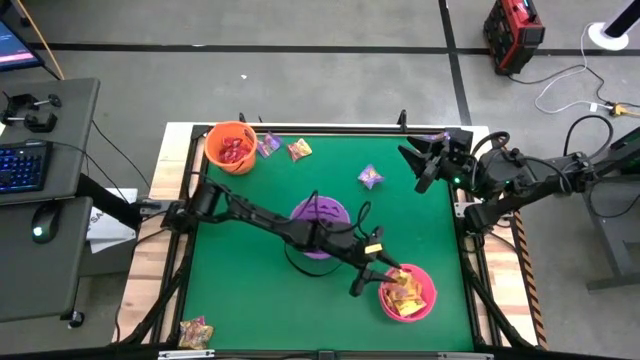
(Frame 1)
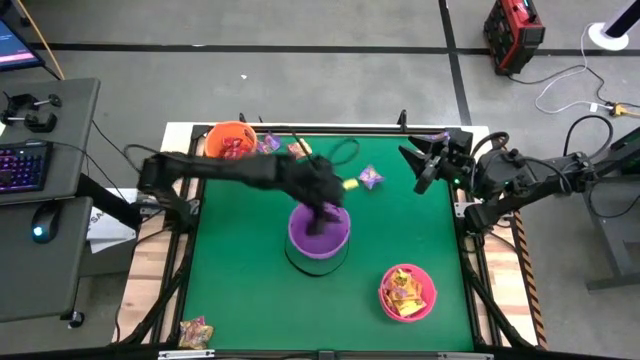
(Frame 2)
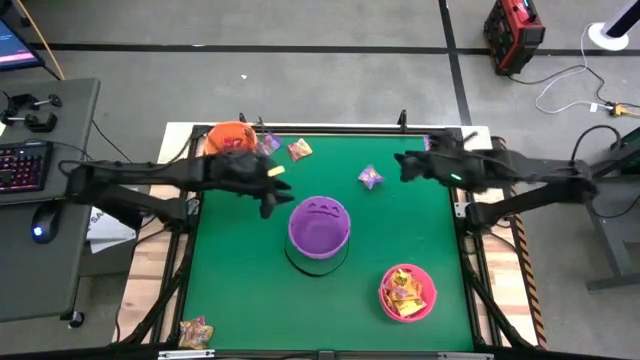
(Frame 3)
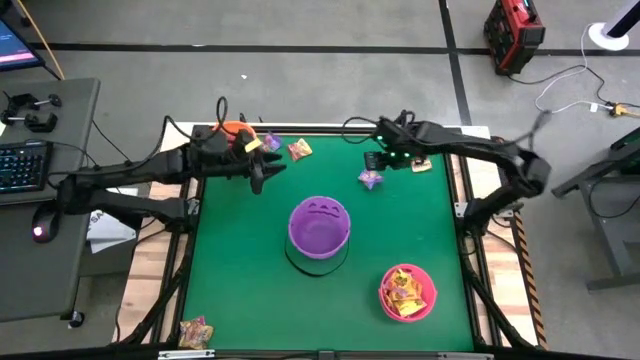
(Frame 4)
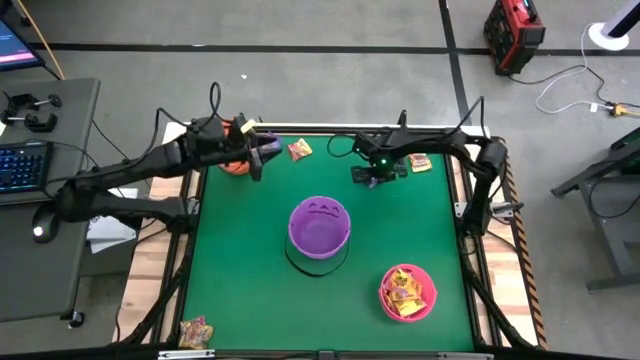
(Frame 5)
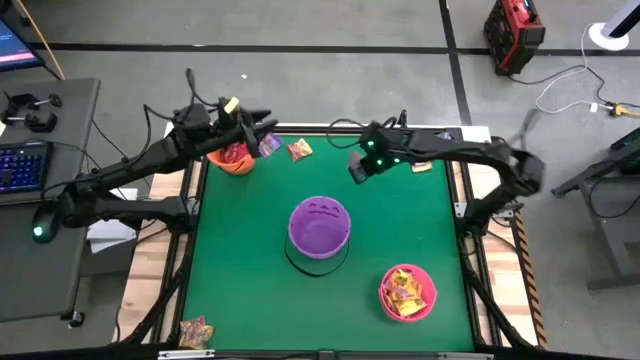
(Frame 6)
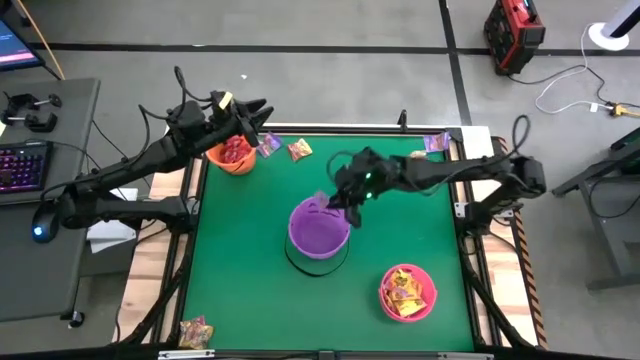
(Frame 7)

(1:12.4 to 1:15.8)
Task: Sort candy by brand, put in halloween buckets
Put the violet candy into the violet bucket

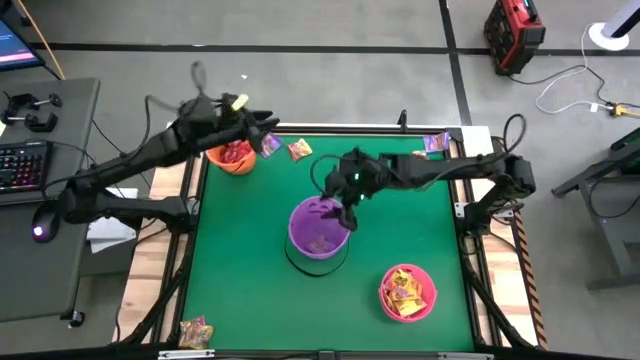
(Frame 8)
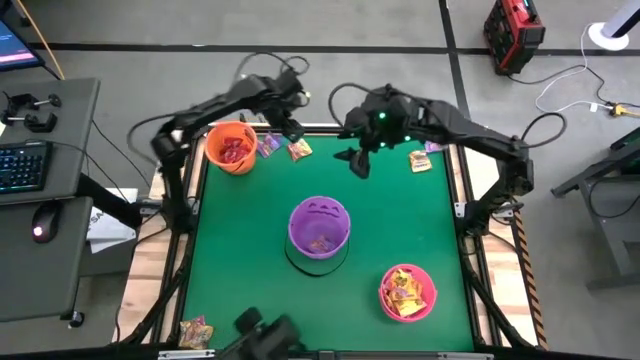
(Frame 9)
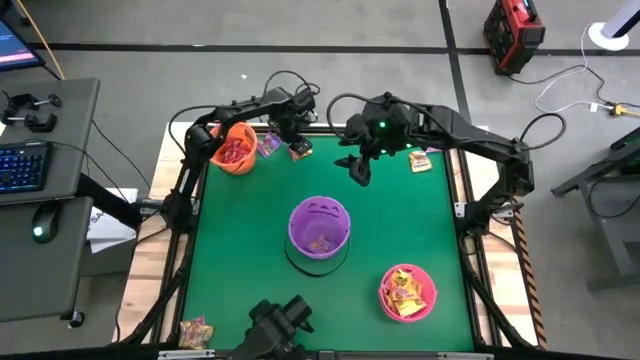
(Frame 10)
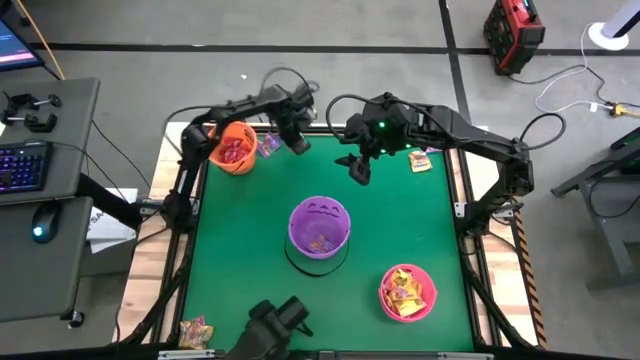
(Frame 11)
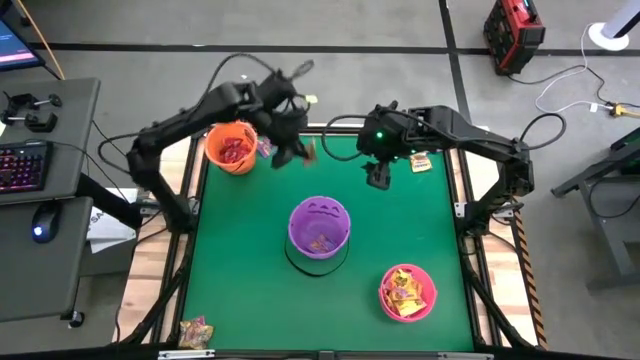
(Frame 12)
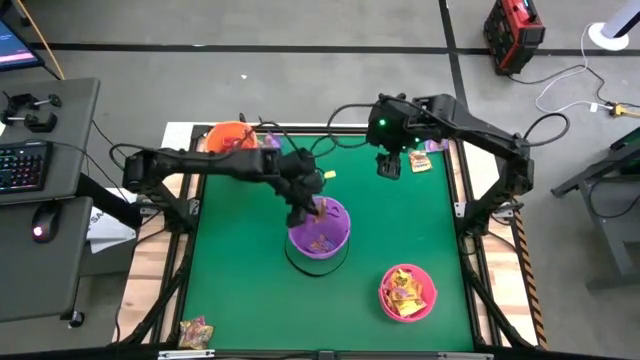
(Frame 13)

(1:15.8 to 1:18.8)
Put the gold candy into the violet bucket

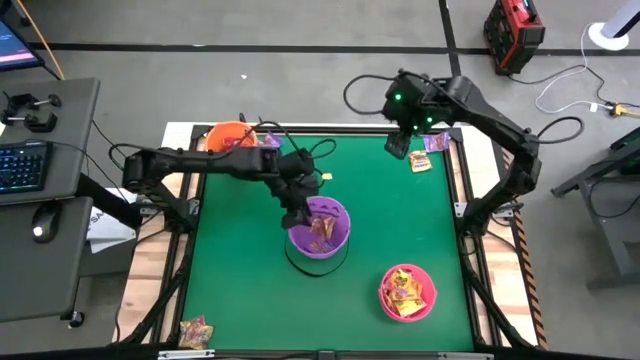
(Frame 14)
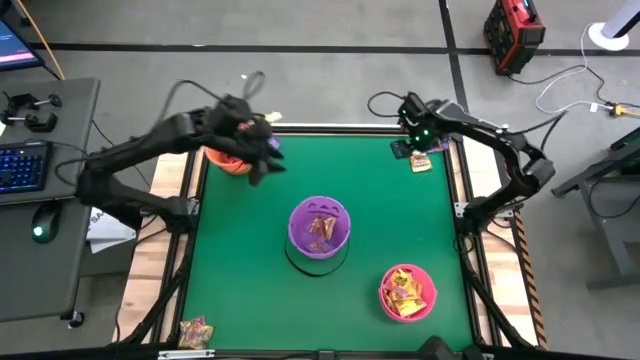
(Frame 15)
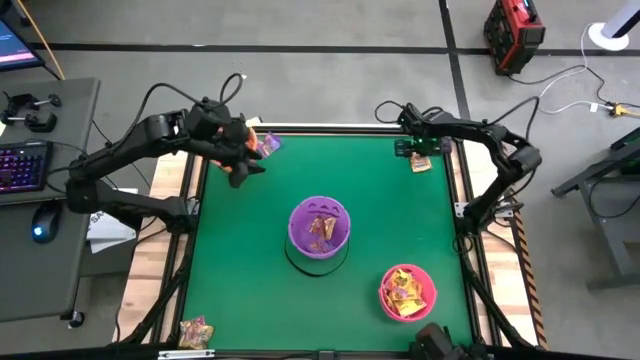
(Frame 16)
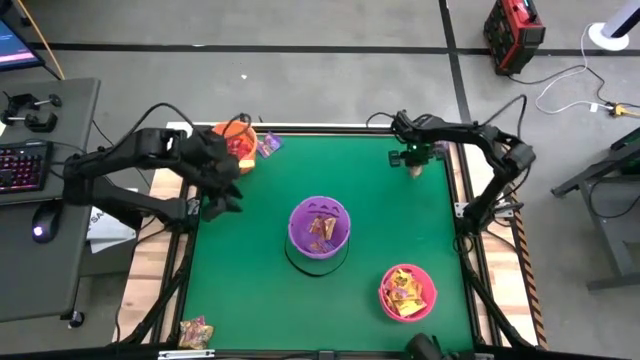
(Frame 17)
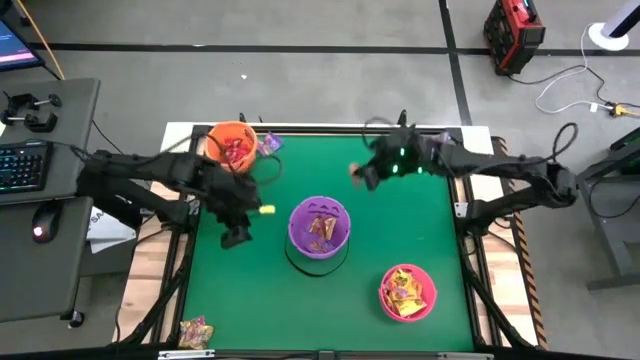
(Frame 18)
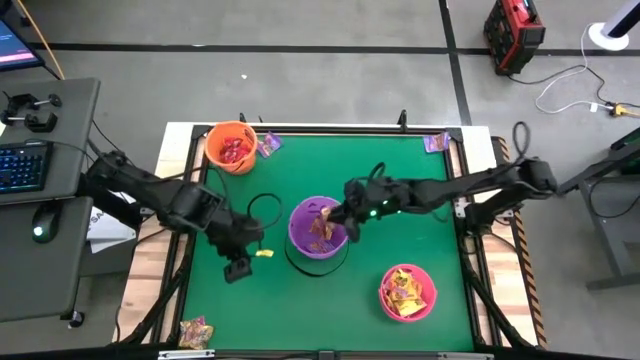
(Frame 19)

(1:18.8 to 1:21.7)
Put the gold candy into the violet bucket

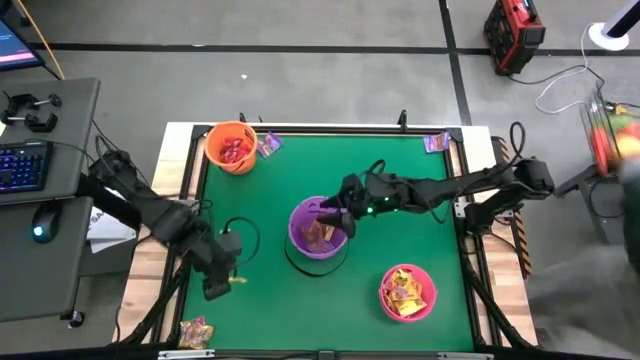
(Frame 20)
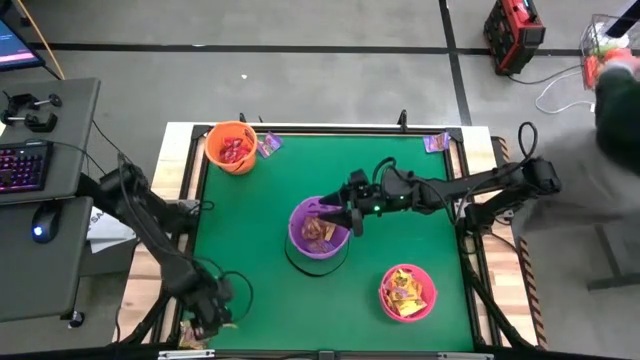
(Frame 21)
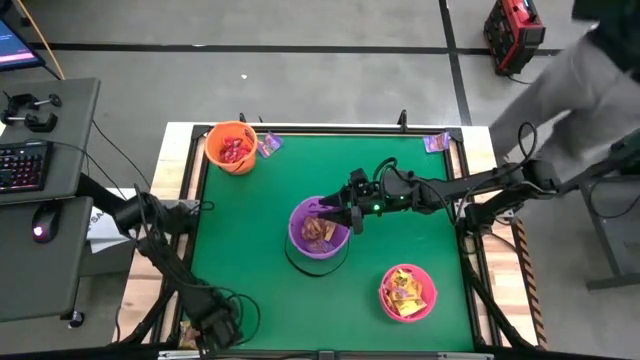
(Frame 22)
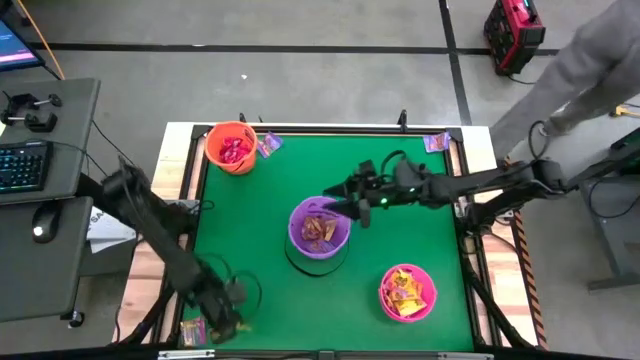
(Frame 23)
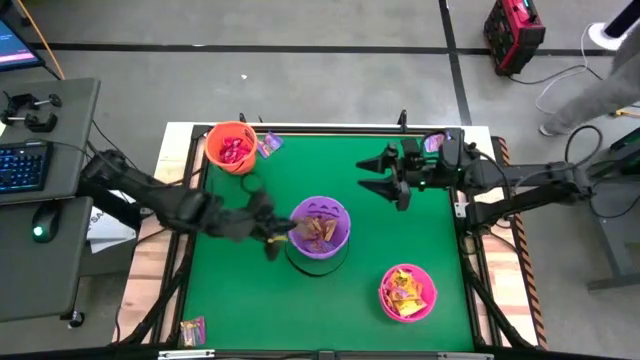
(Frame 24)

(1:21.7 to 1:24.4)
Put the gold candy into the violet bucket

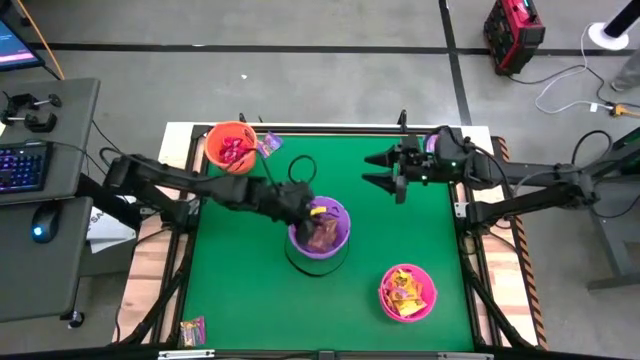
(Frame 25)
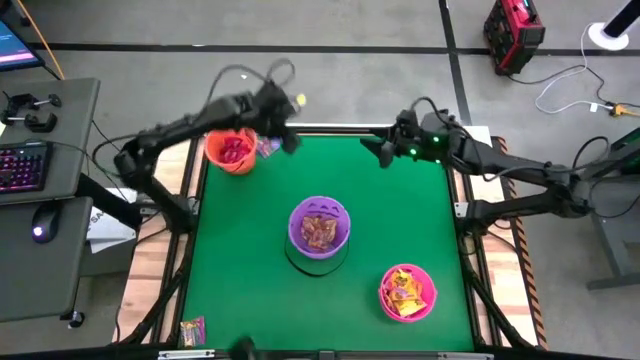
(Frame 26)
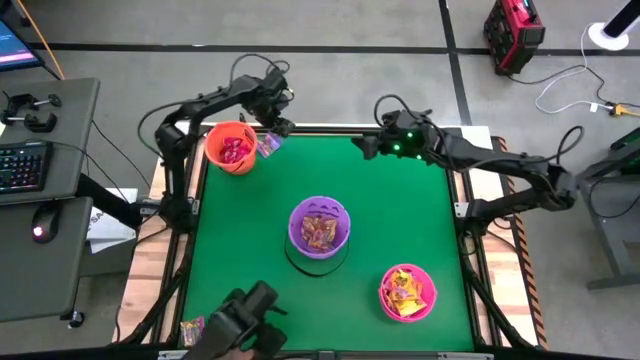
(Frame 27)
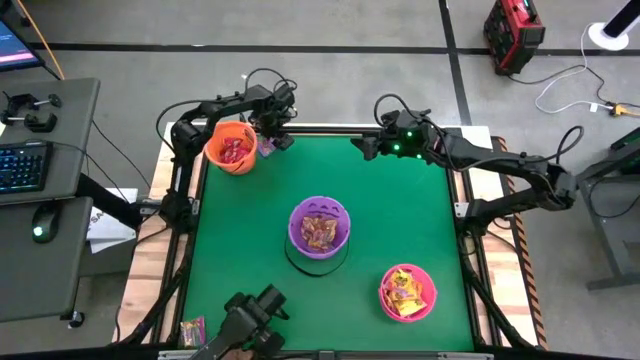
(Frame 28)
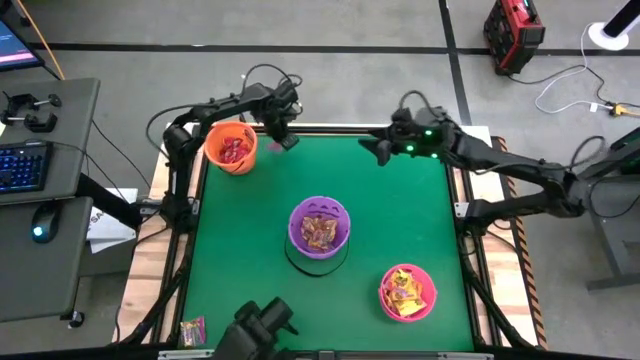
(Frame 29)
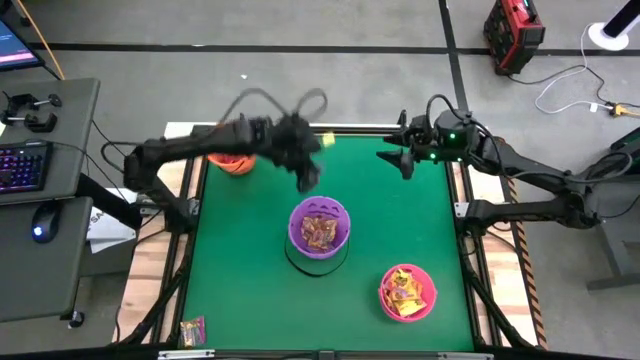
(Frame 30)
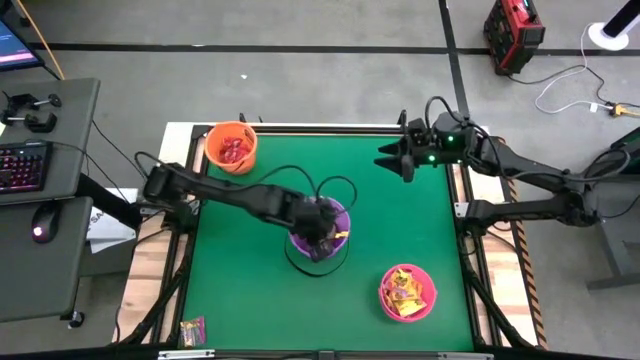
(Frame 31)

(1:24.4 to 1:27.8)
Put the violet candy into the violet bucket

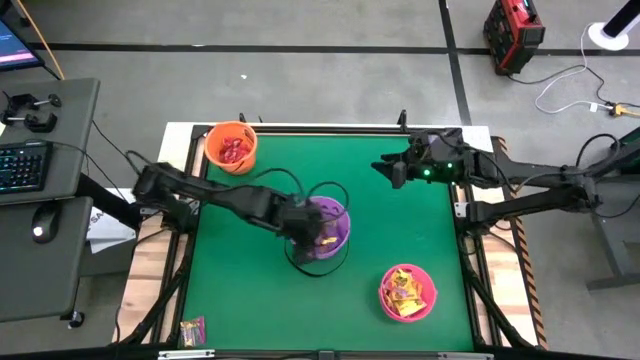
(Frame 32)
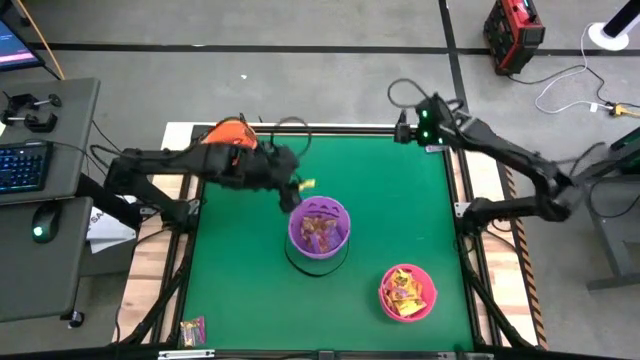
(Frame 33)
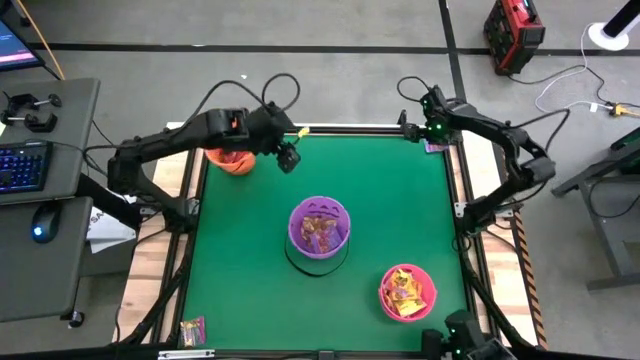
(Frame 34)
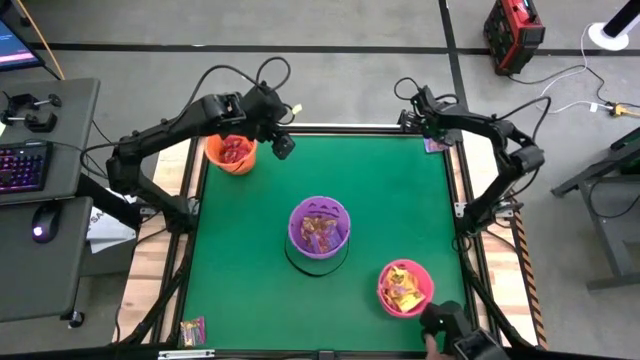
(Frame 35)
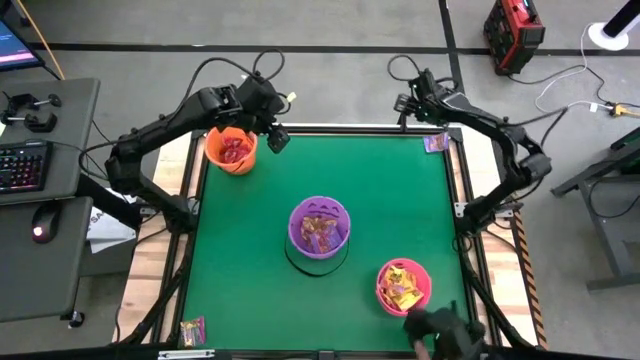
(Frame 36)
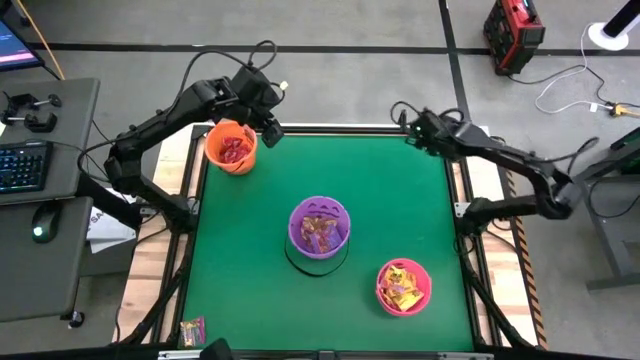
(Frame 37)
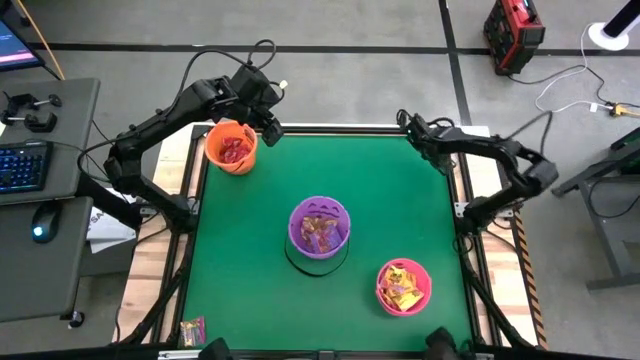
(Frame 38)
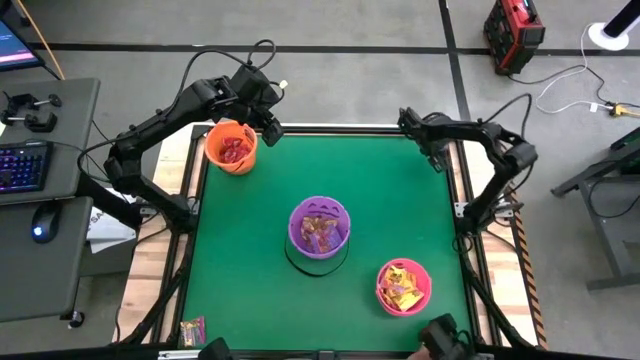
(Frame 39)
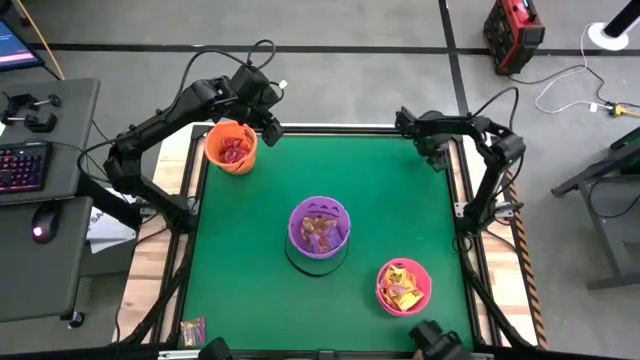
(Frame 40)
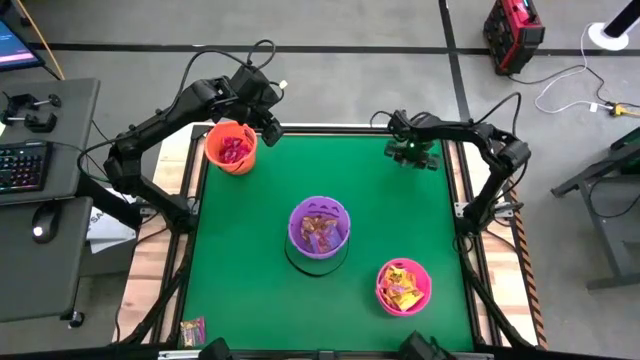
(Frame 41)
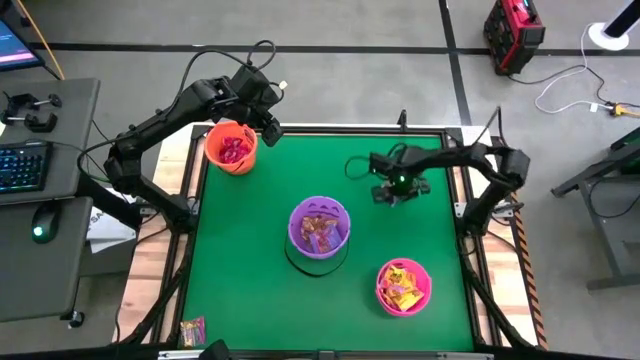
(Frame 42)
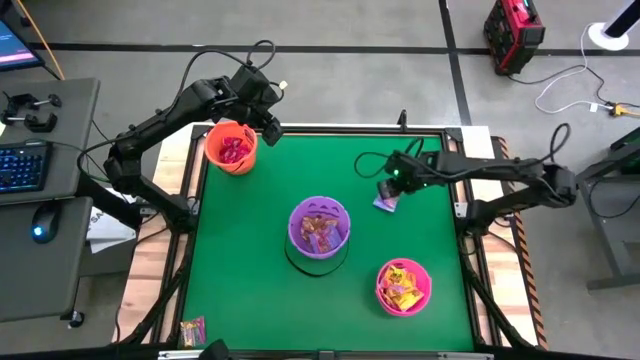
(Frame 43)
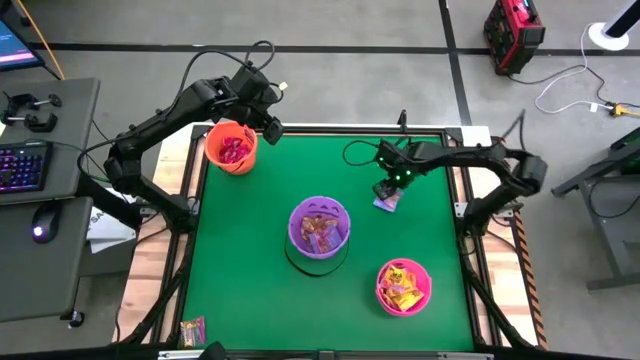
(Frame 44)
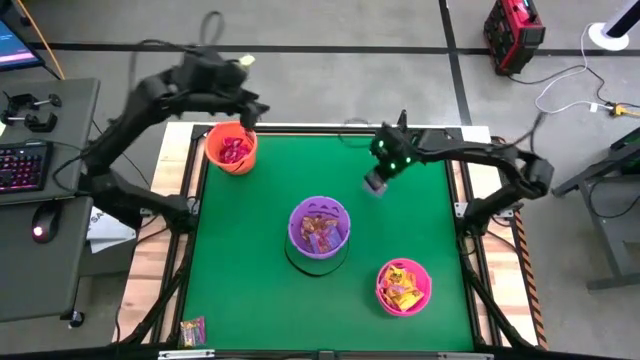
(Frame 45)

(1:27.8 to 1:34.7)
Put the violet candy into the violet bucket
